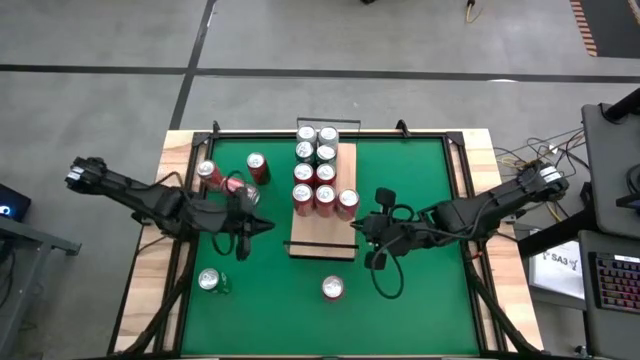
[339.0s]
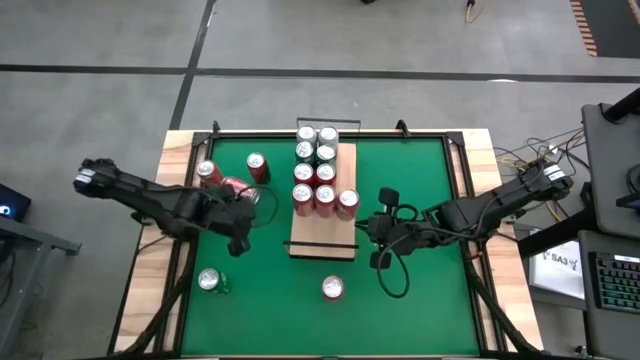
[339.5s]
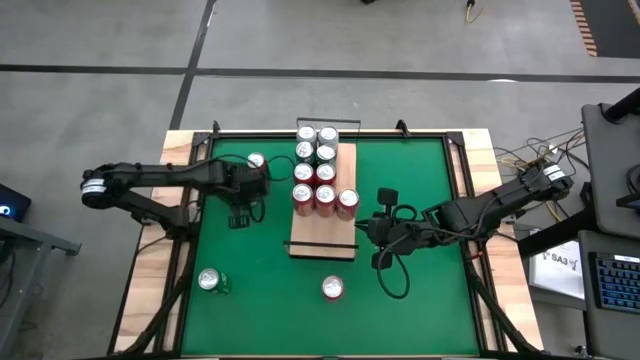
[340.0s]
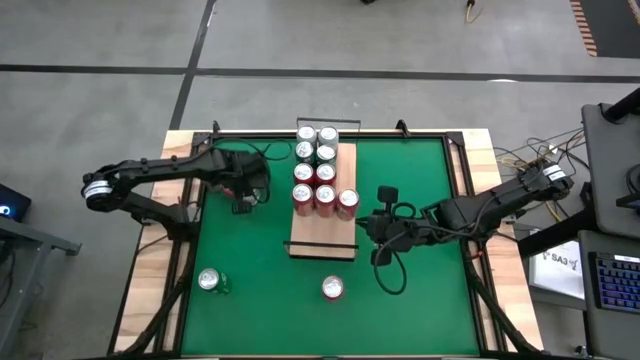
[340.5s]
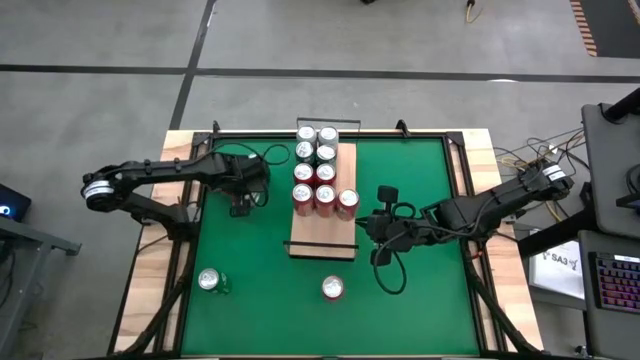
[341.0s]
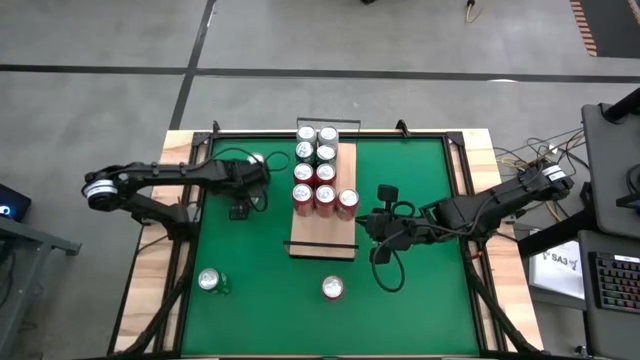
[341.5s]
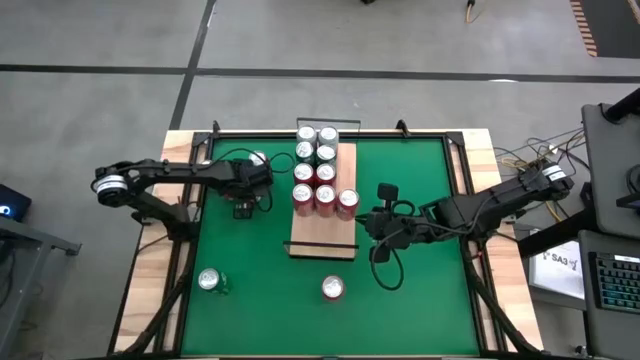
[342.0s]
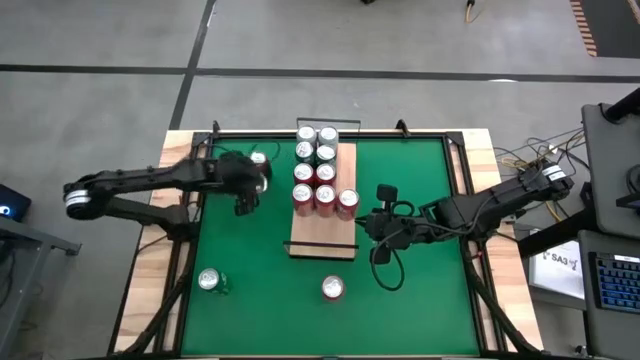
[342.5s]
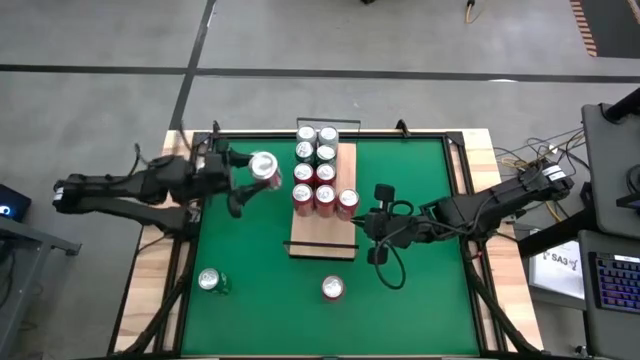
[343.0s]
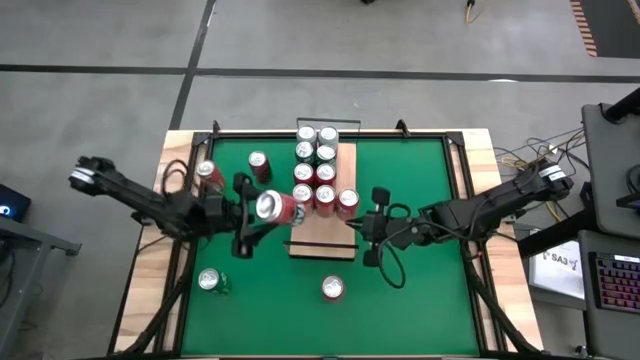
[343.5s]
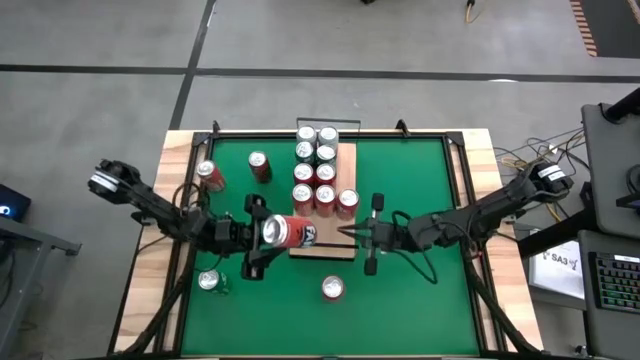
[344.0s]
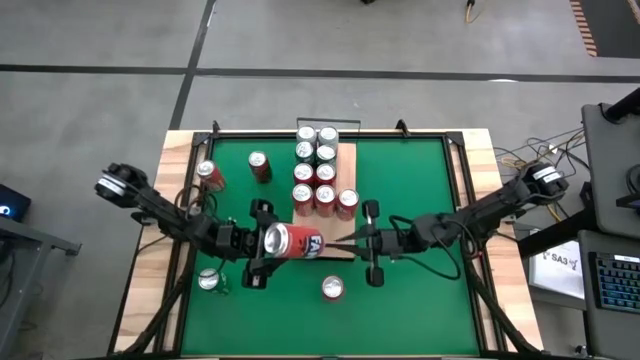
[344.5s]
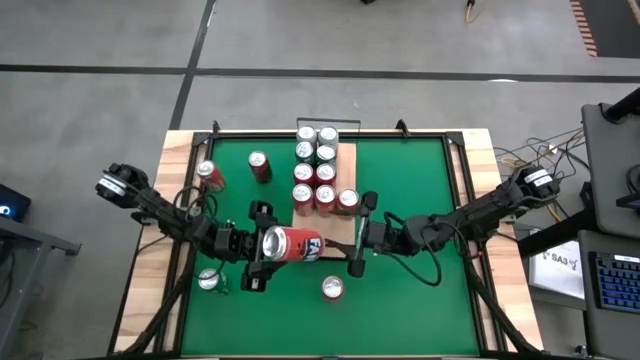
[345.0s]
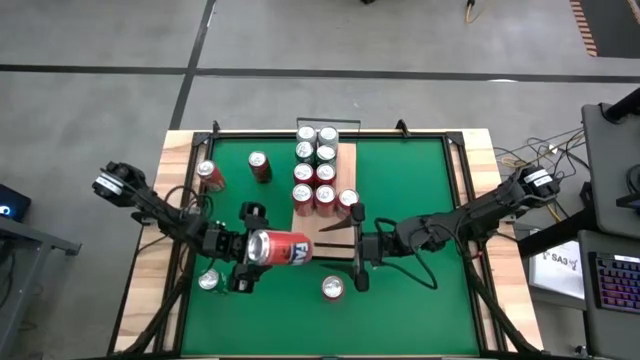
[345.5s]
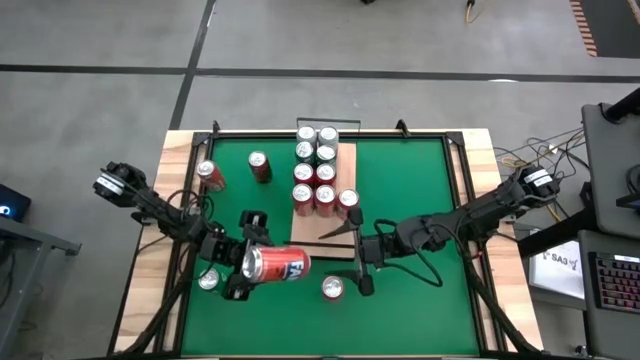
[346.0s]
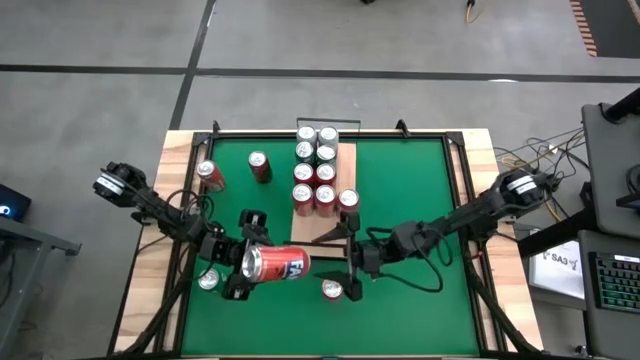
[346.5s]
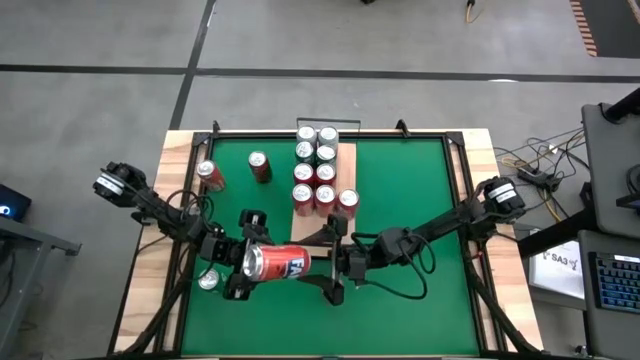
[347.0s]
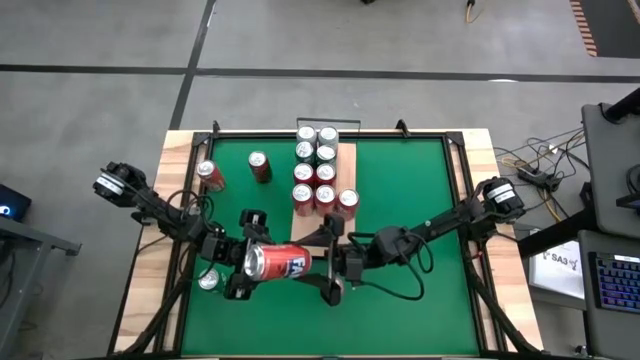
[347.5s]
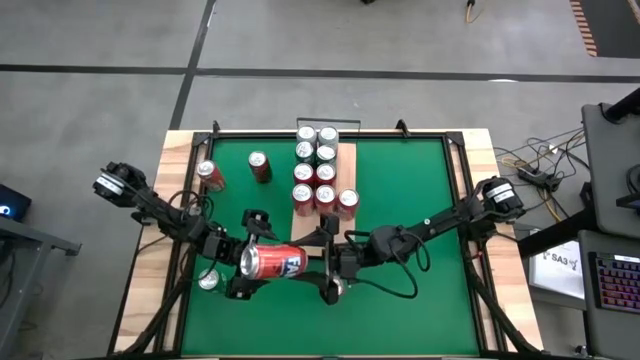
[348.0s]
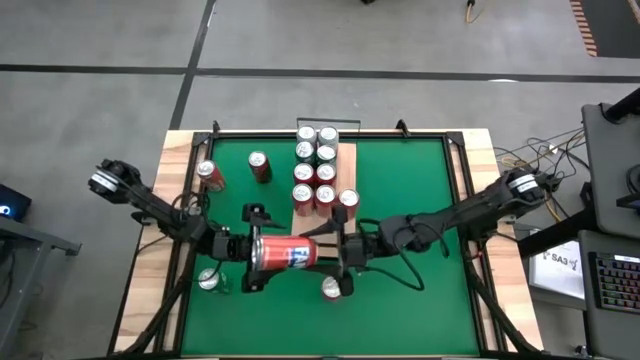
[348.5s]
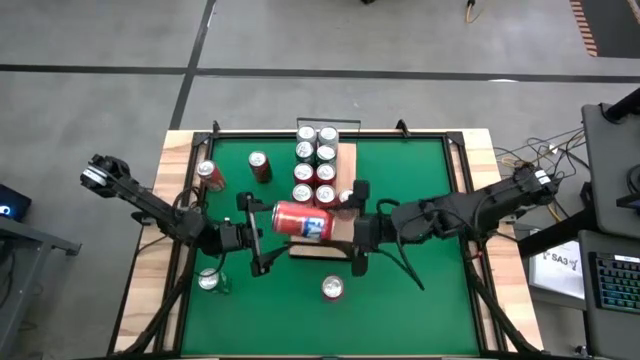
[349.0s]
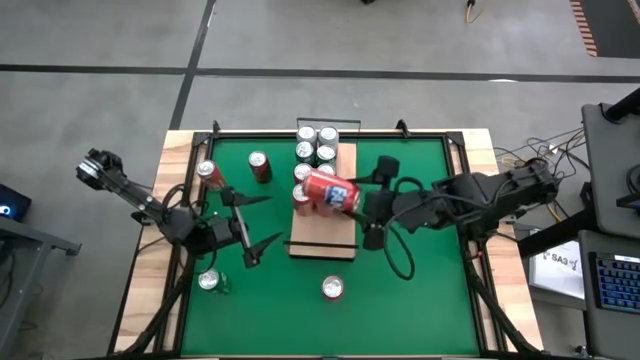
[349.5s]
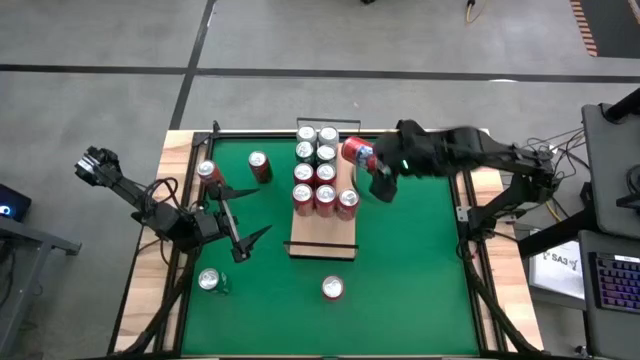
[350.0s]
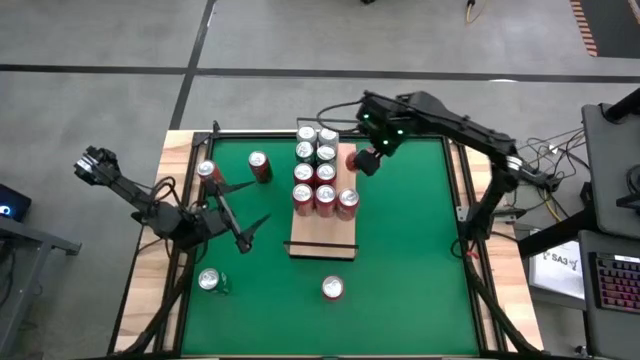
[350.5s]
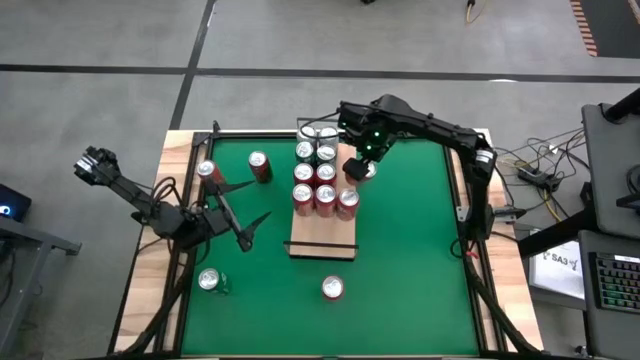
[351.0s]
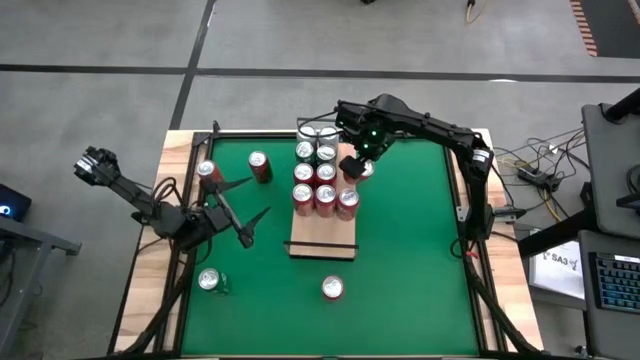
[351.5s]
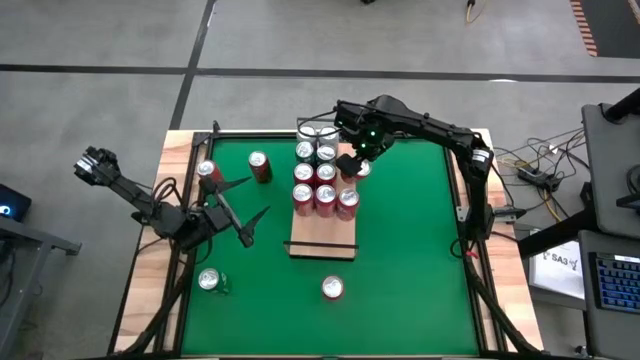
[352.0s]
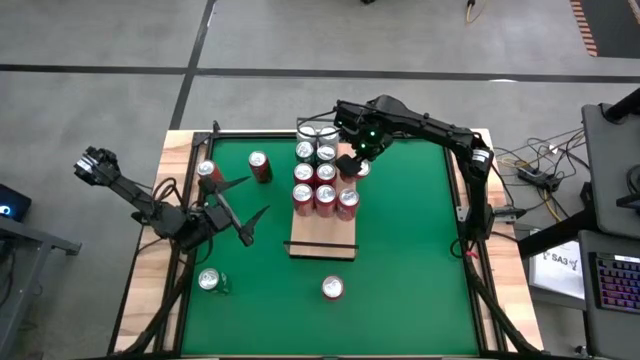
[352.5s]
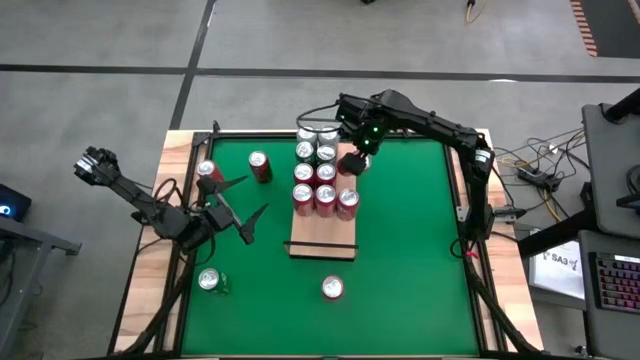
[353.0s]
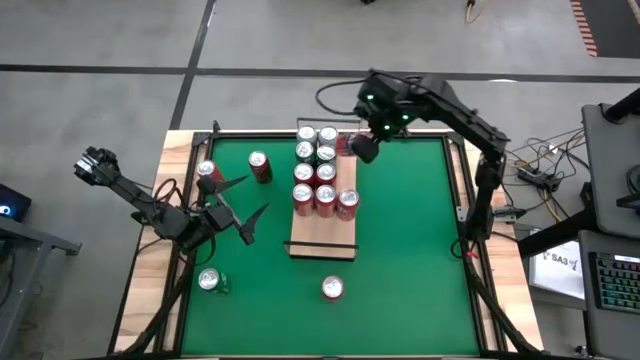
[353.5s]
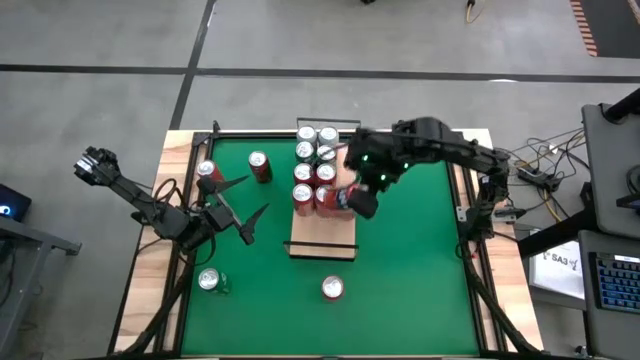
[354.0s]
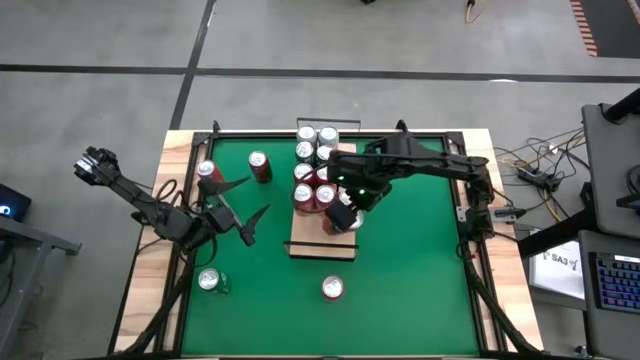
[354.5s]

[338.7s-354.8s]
Task: Place canned beverage on shelf
Put the orange soda can on the shelf and aligned with the other orange soda can

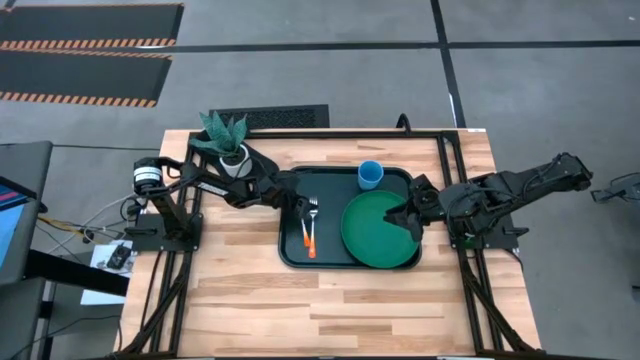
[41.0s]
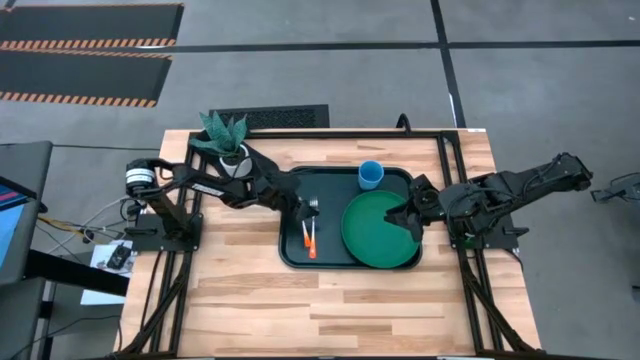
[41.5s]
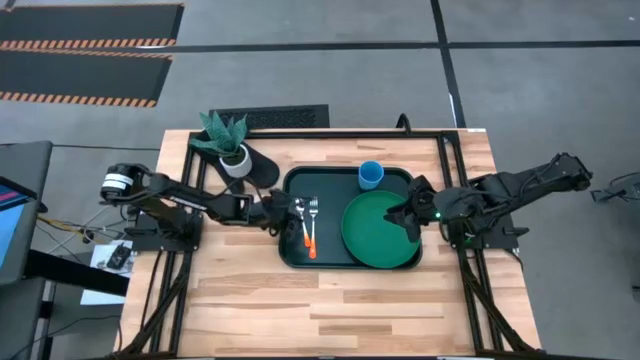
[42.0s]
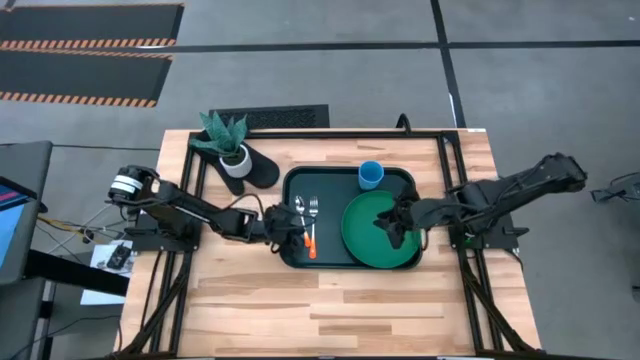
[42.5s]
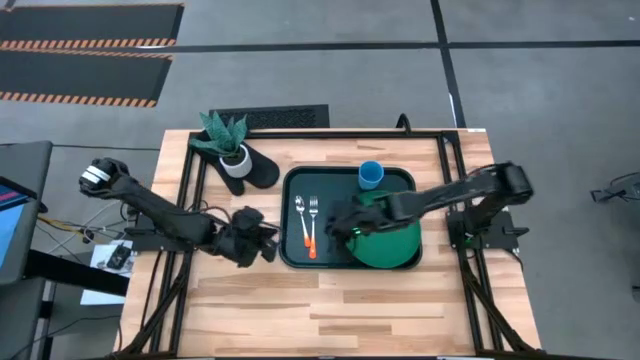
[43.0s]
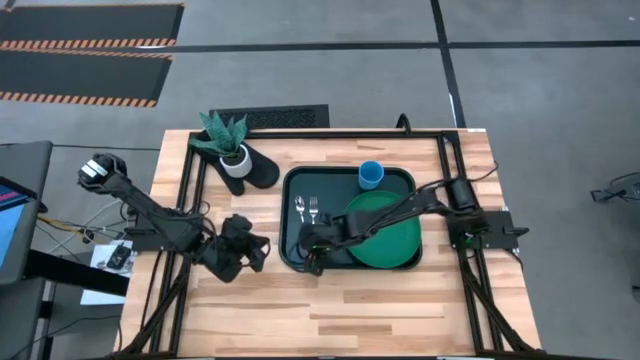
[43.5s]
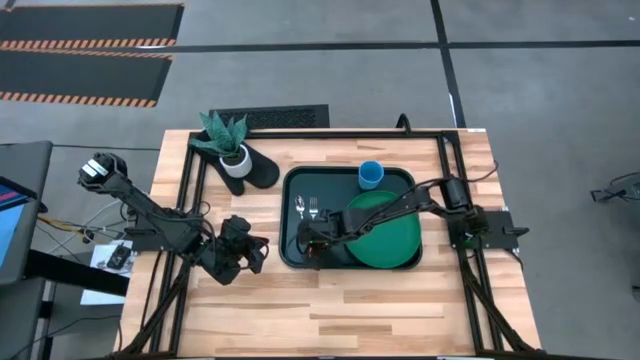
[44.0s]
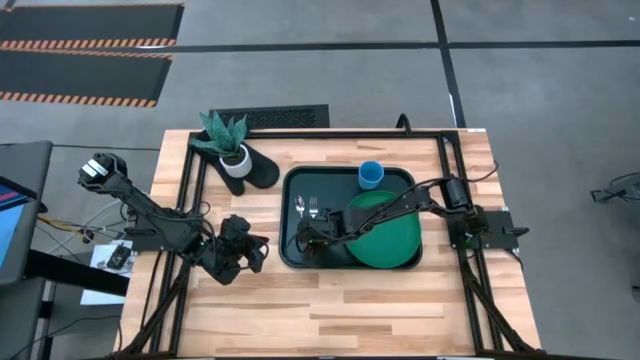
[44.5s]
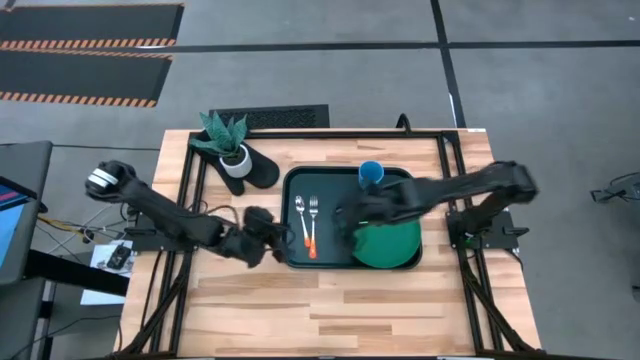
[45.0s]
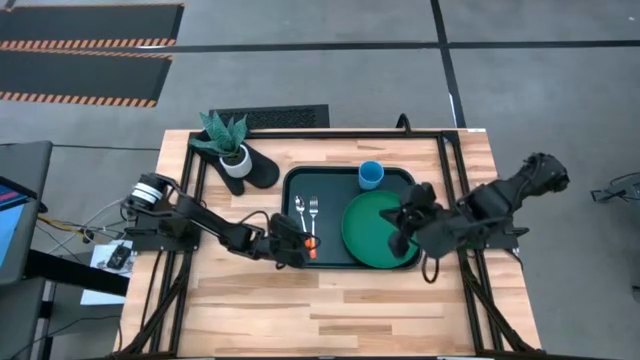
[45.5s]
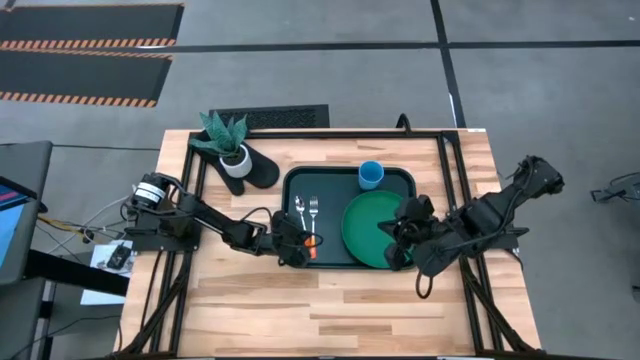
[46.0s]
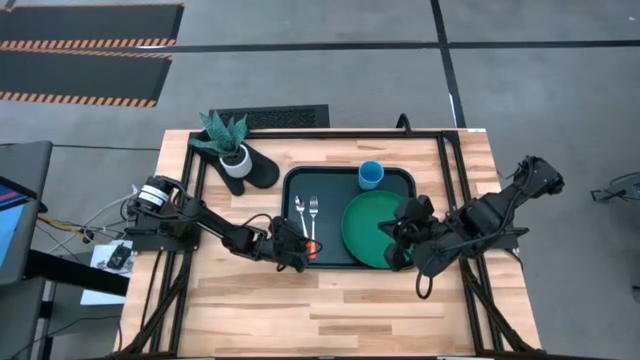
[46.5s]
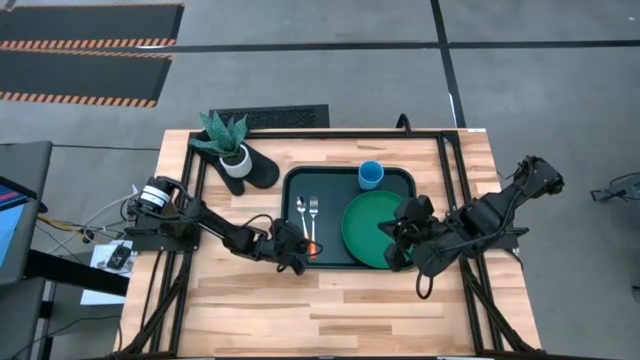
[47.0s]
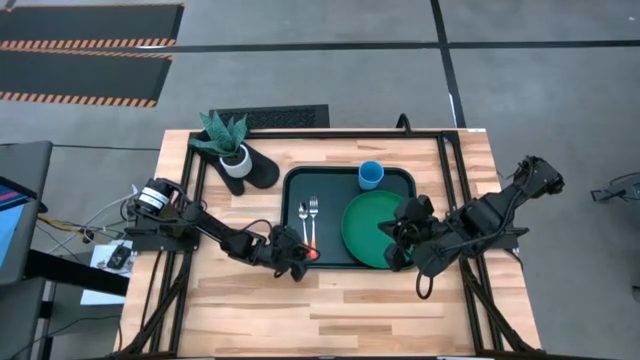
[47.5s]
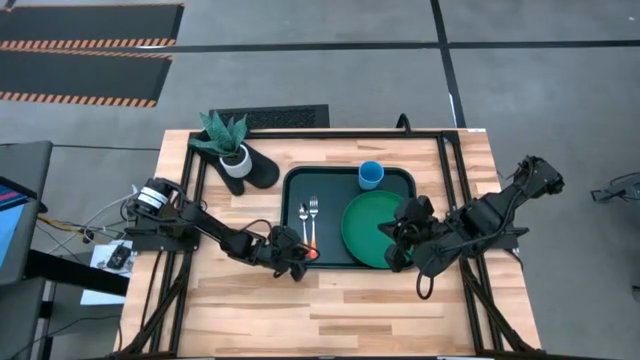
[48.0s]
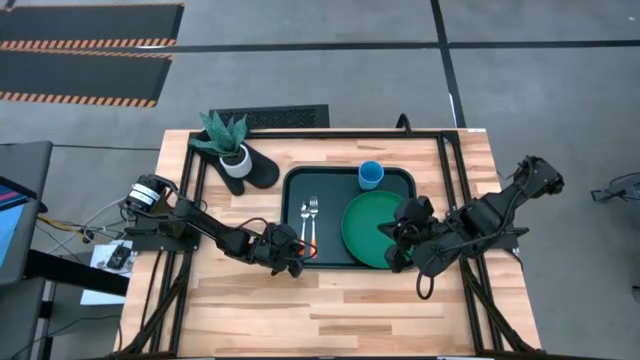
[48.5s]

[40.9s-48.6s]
Task: Pick and place plate/cup/fork/spoon on tray
Adjust the orange spoon
